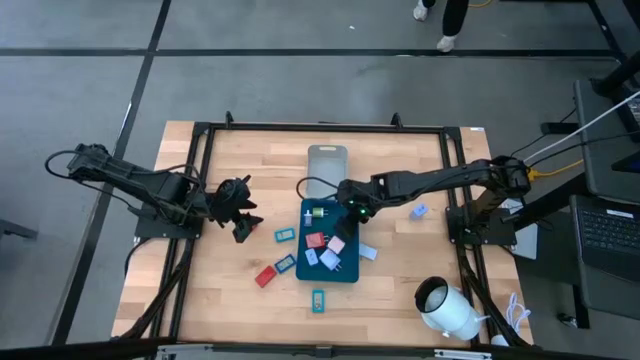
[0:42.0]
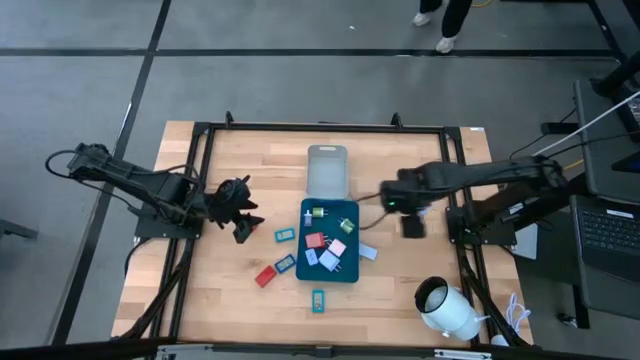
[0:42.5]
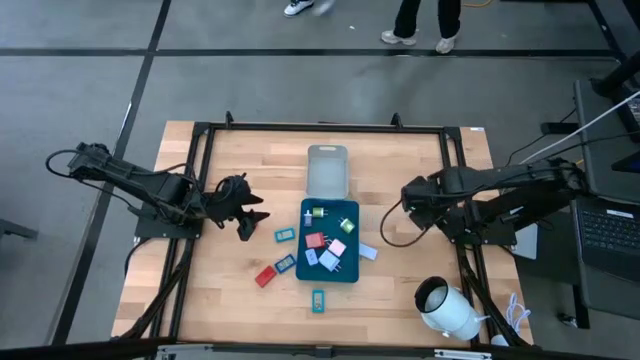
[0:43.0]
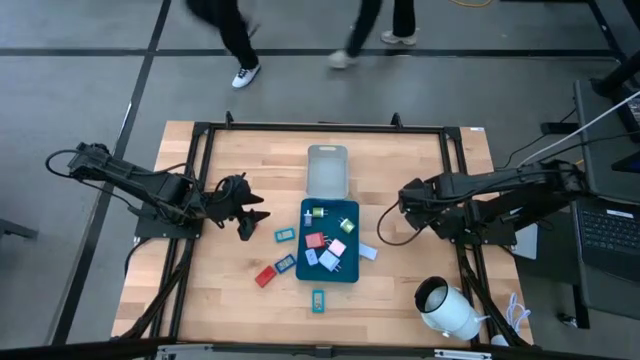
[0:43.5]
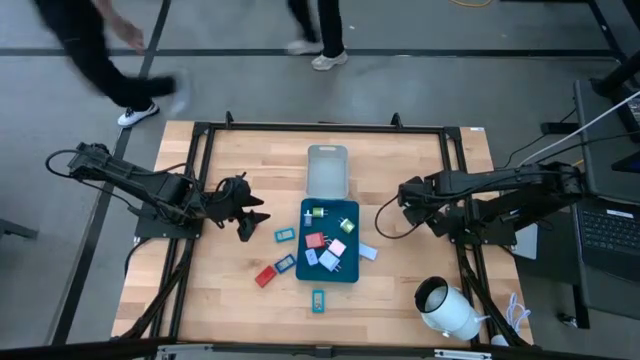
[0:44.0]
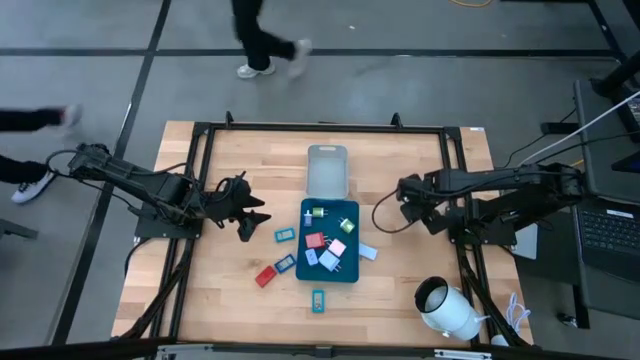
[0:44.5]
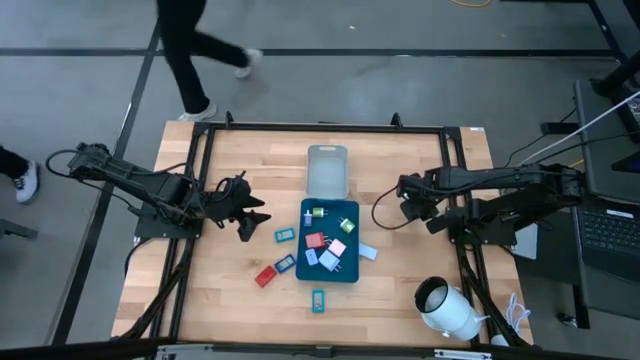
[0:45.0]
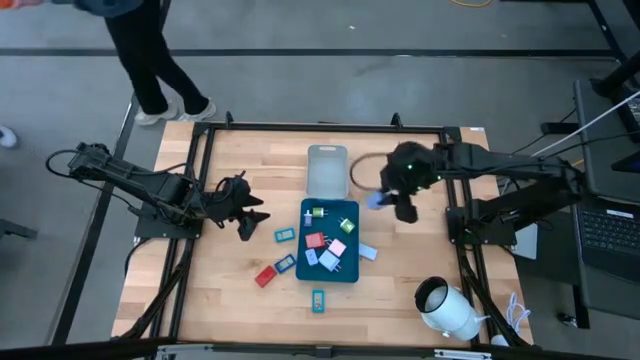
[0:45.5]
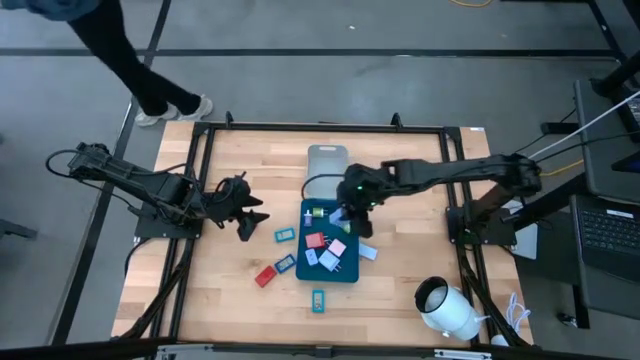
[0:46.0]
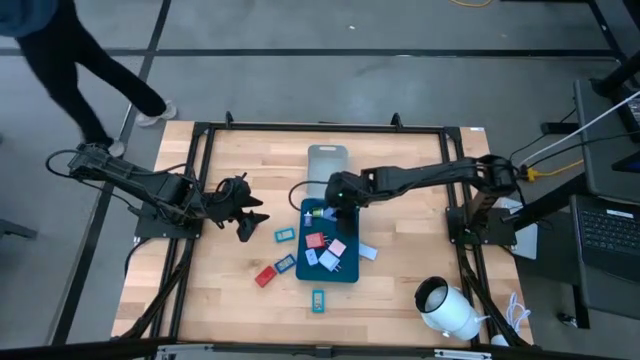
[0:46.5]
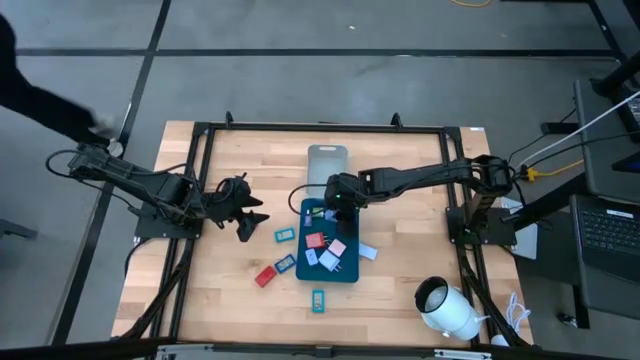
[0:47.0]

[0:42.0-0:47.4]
Task: Pick & Place Office items
Put the light blue charger adapter into the blue bin

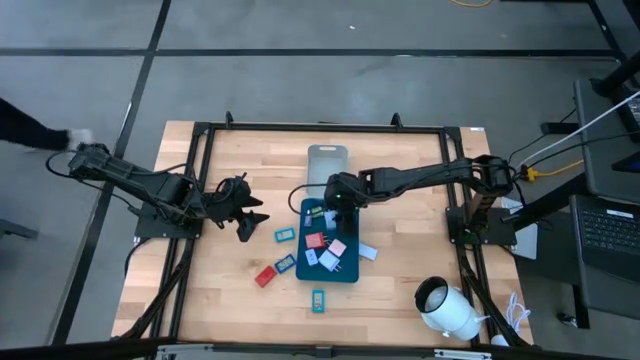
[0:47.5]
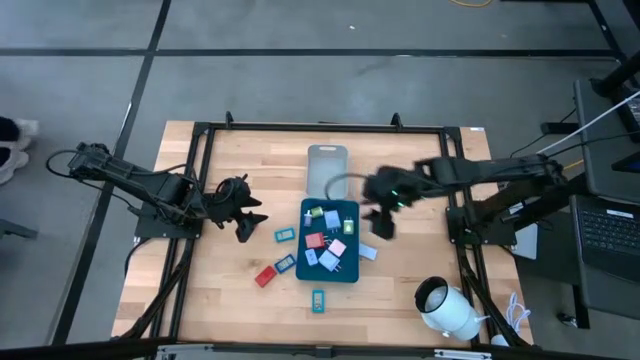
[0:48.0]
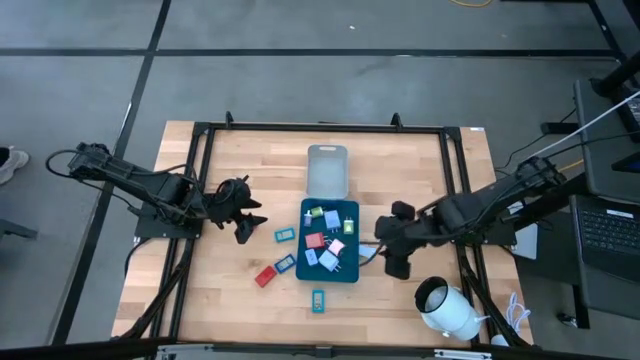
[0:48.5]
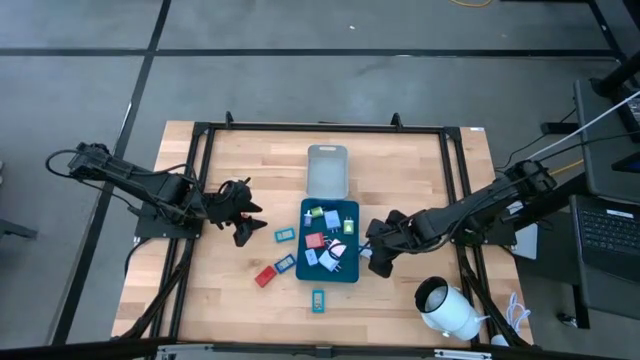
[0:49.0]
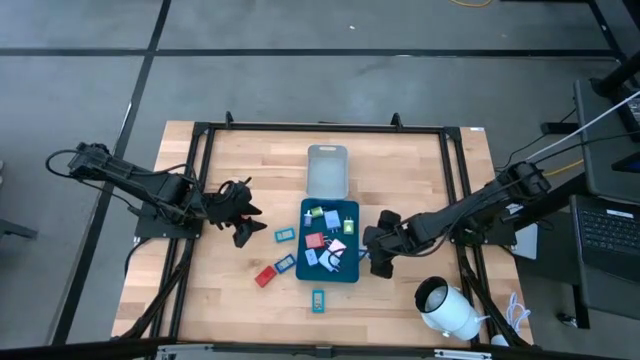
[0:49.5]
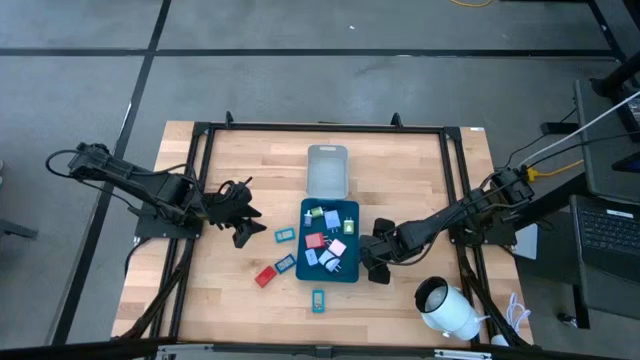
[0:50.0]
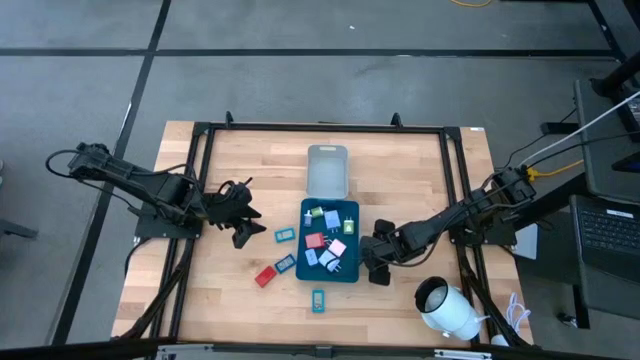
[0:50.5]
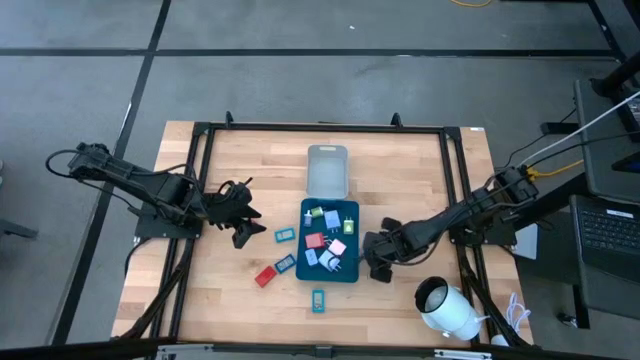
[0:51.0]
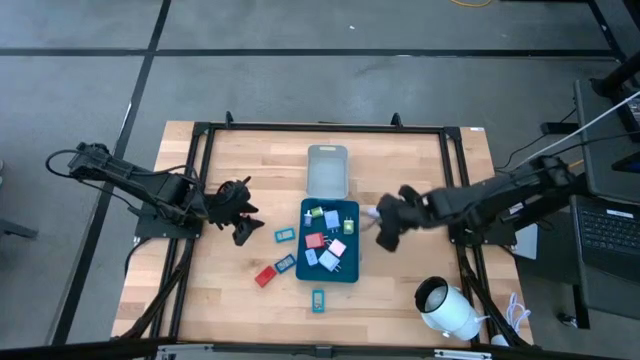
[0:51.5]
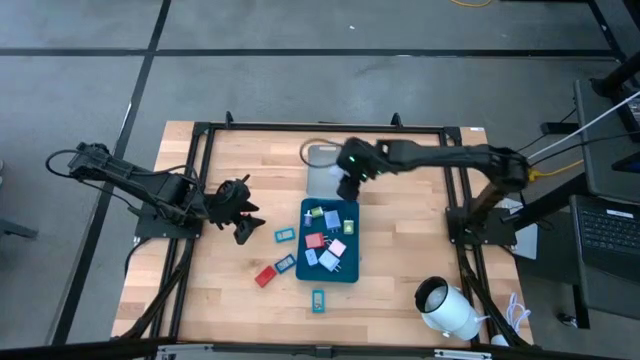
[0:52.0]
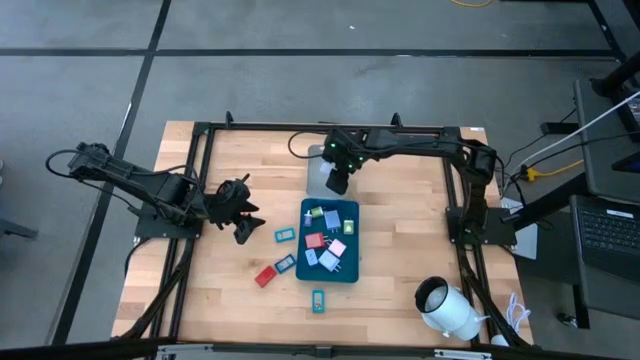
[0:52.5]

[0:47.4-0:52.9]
Put the purple digital clock into the gray bin

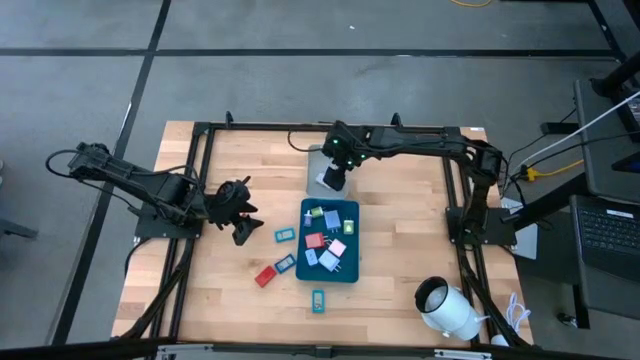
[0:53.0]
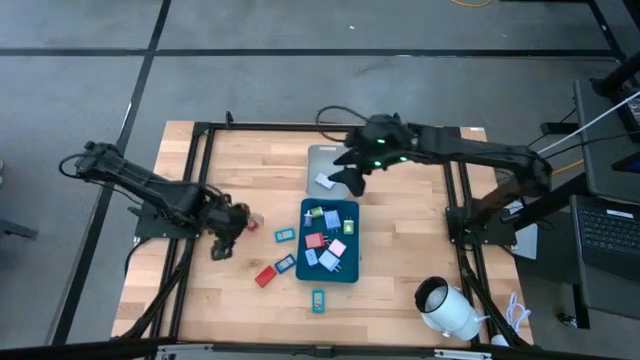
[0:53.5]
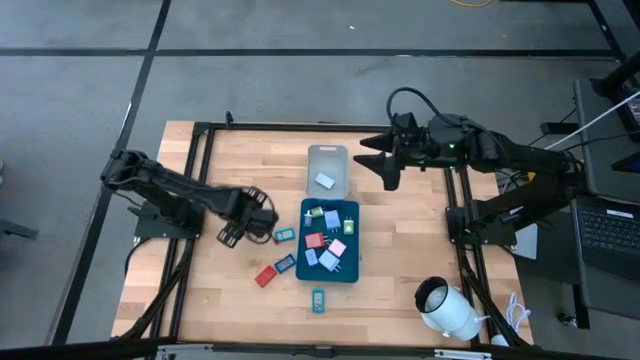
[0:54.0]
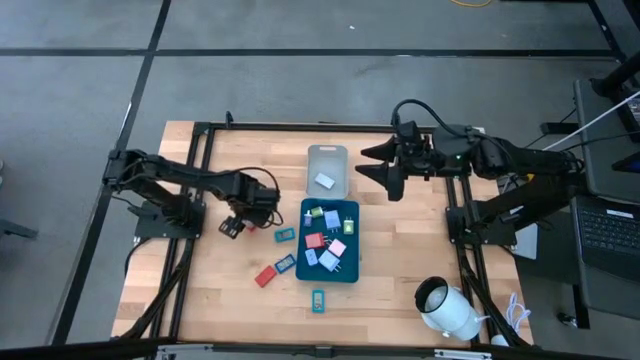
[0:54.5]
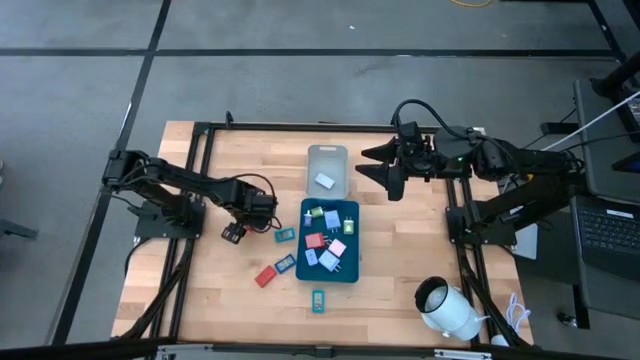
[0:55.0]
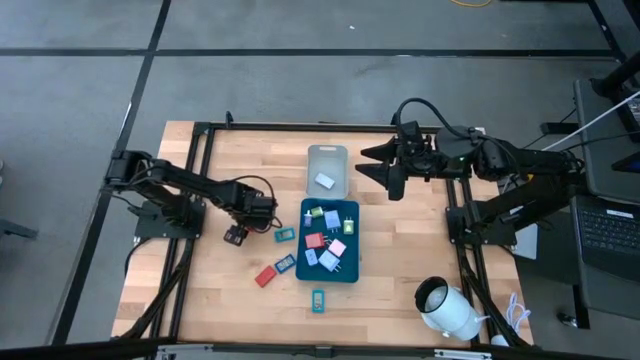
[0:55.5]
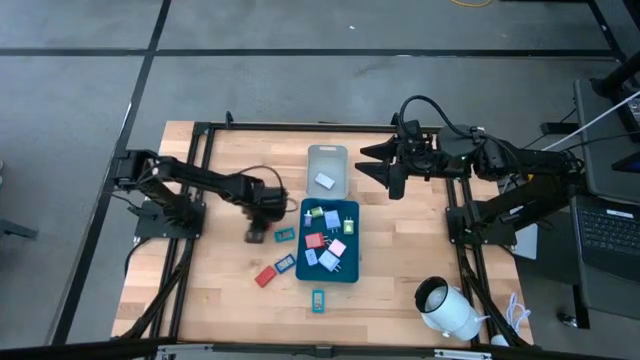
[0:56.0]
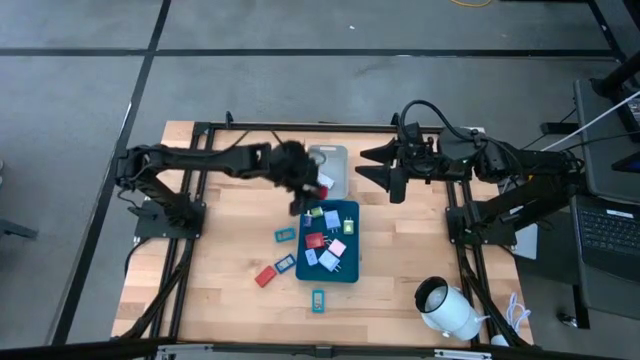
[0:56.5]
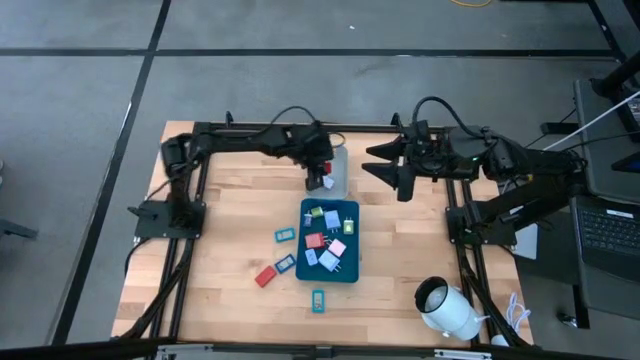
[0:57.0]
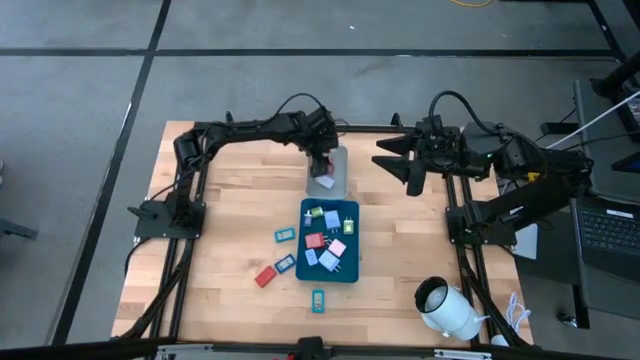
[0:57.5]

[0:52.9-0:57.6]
Put the digital clock into the gray bin

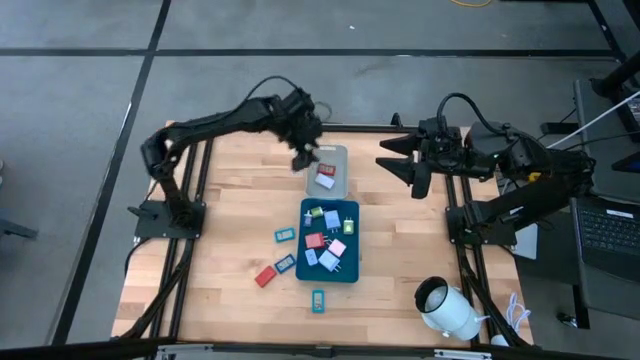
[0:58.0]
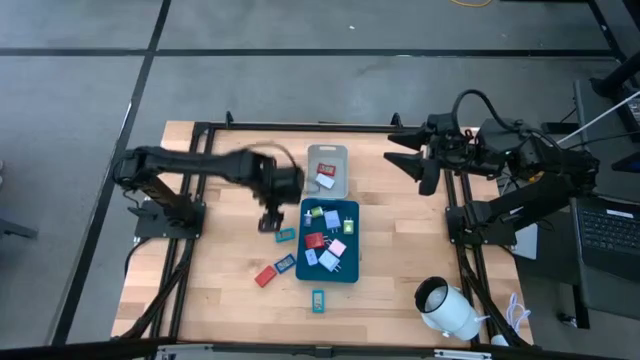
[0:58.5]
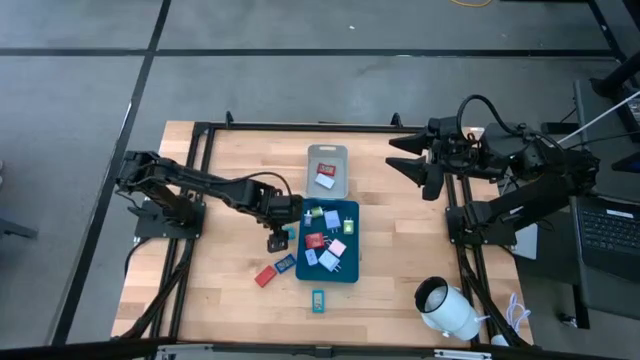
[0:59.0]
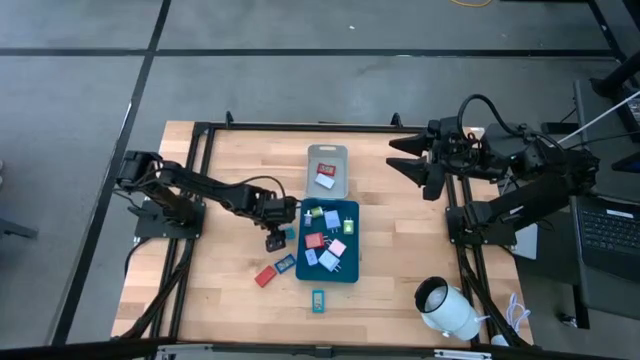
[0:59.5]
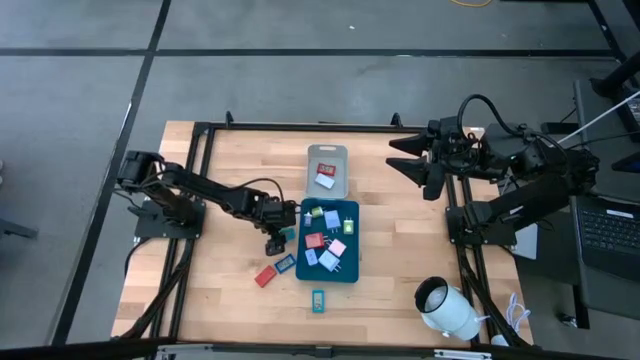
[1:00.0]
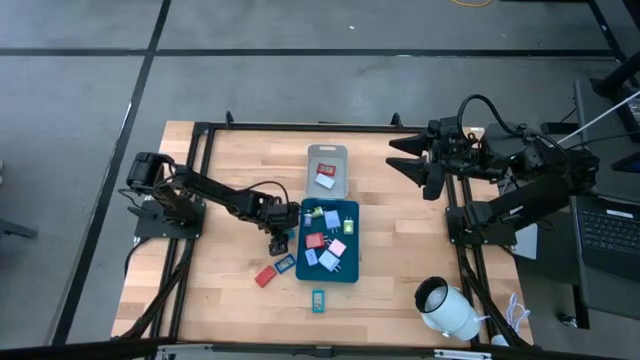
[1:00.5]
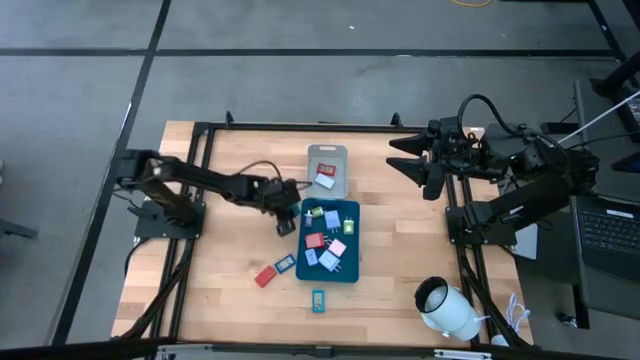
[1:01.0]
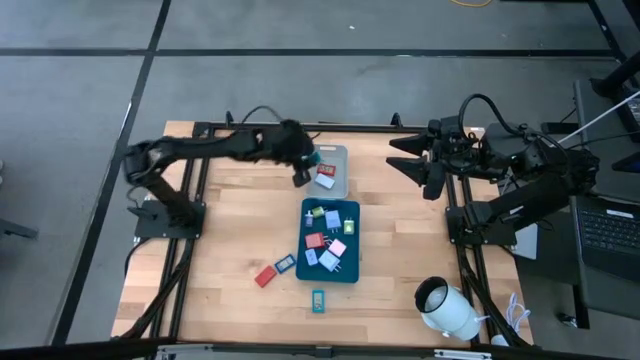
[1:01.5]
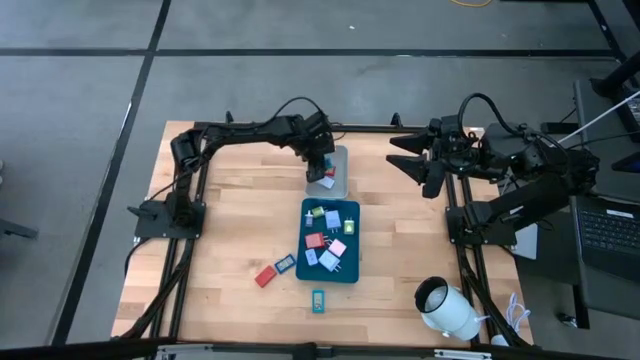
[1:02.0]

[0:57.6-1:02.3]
Put the light blue digital clock into the gray bin

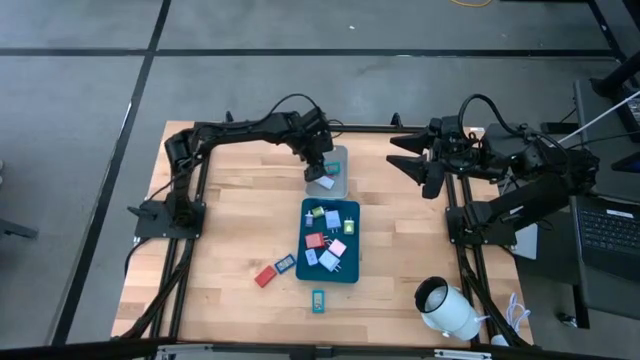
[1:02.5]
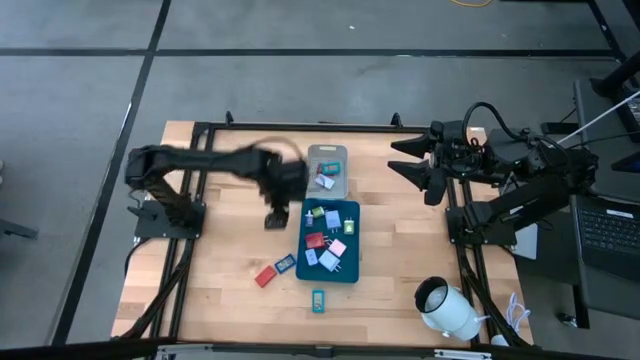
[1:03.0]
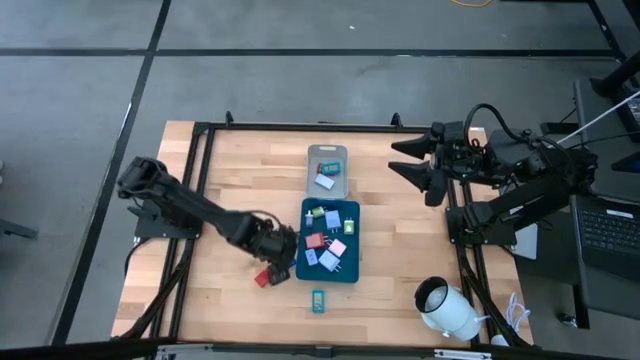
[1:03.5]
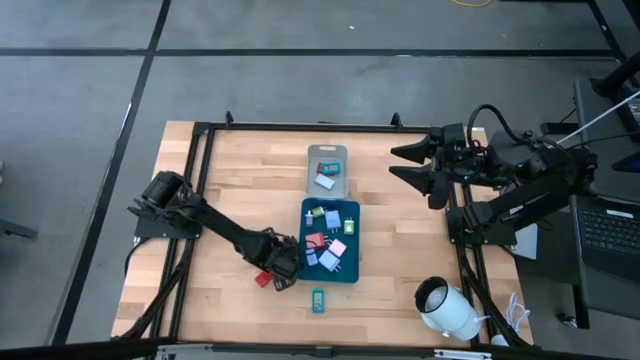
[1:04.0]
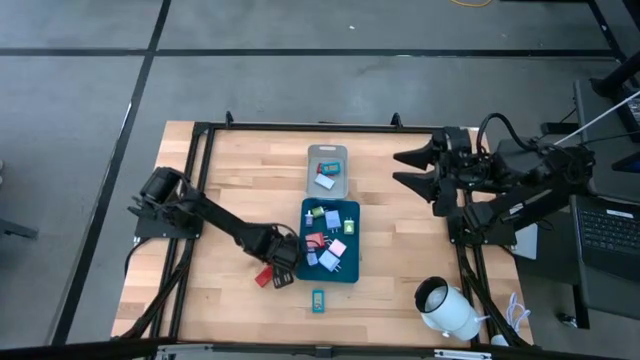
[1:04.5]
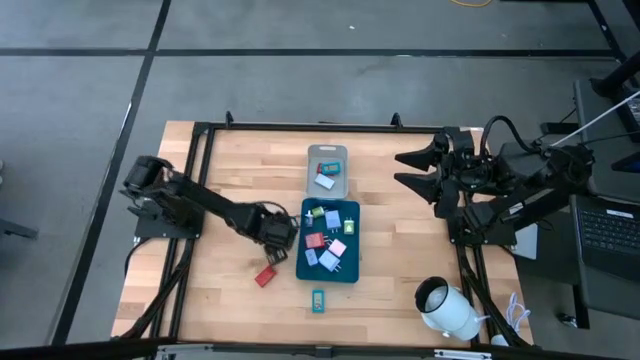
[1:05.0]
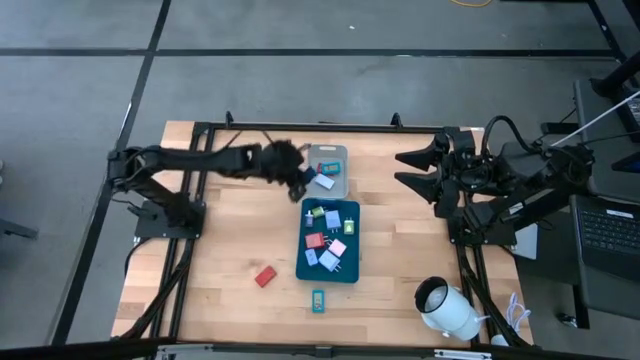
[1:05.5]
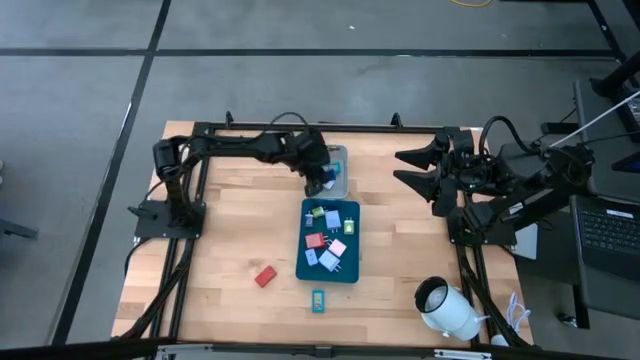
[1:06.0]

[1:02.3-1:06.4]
Put the blue digital clock into the gray bin
